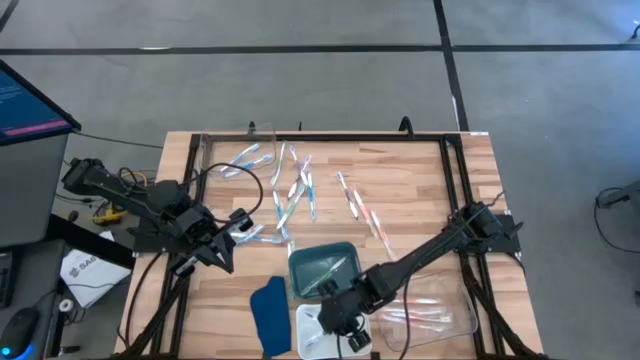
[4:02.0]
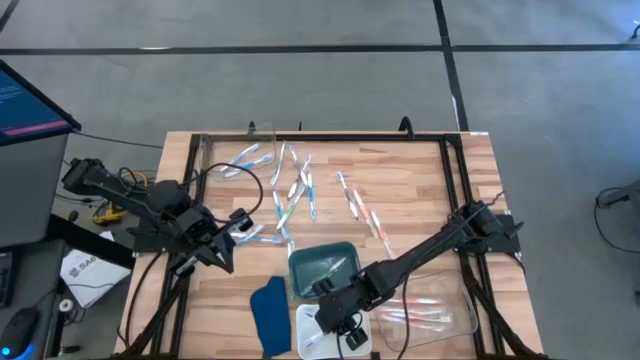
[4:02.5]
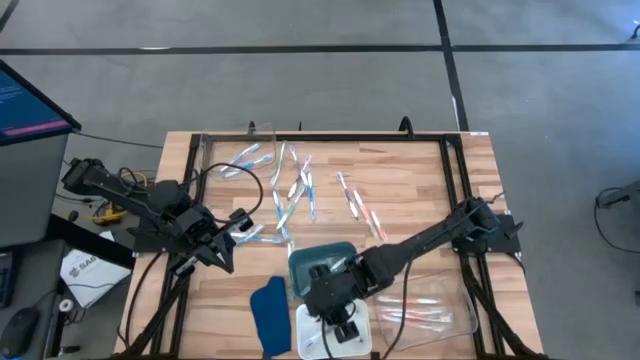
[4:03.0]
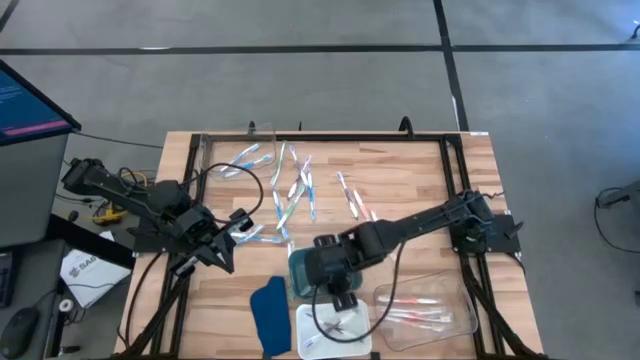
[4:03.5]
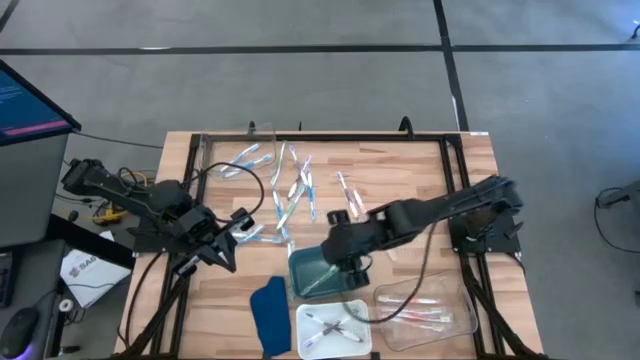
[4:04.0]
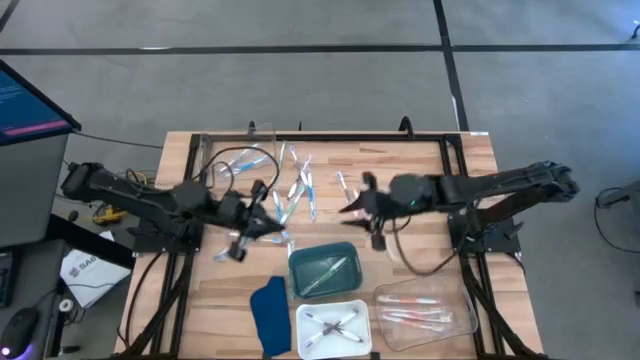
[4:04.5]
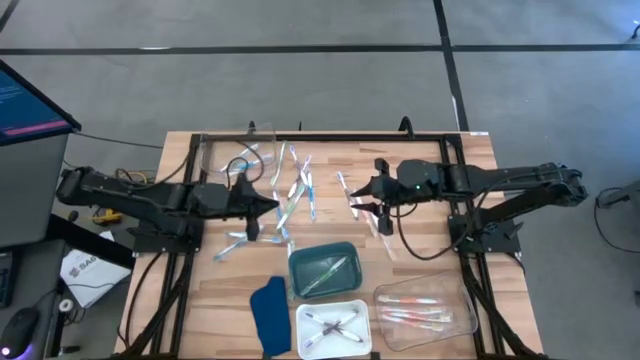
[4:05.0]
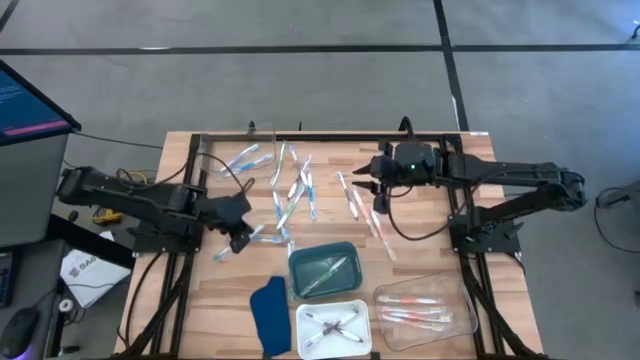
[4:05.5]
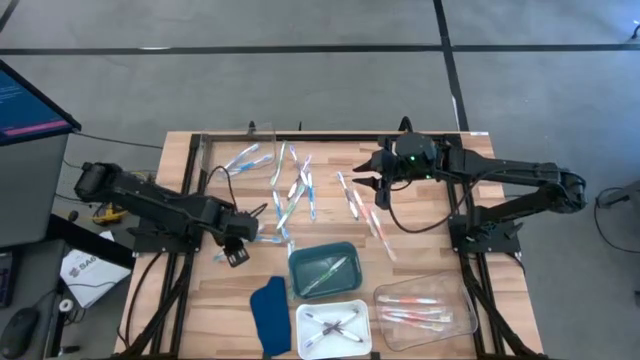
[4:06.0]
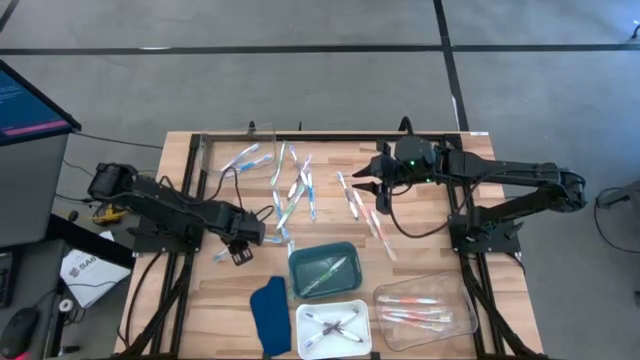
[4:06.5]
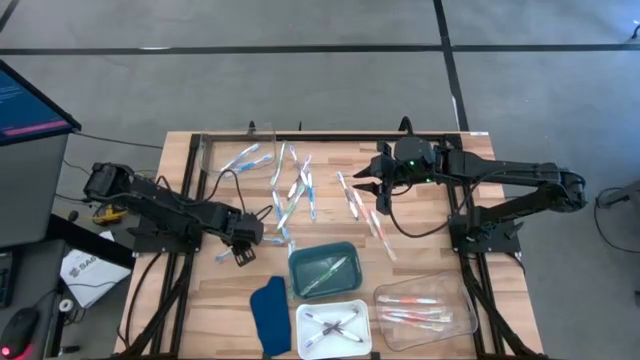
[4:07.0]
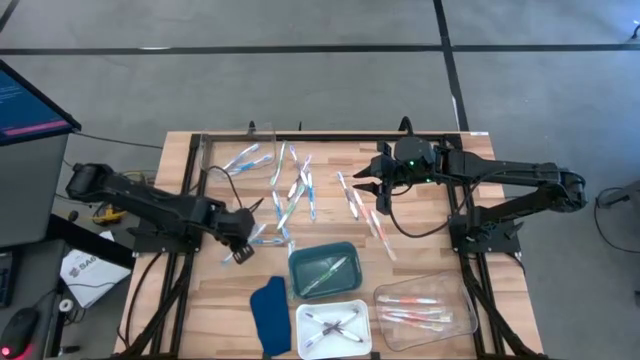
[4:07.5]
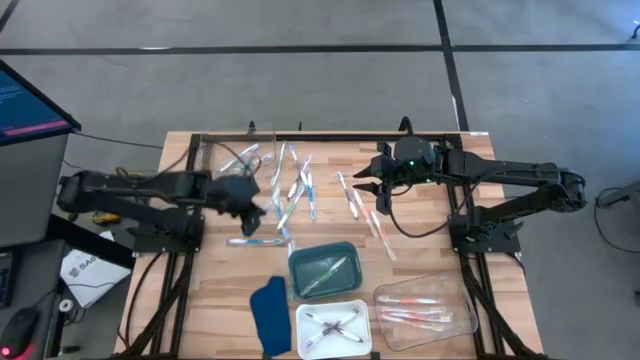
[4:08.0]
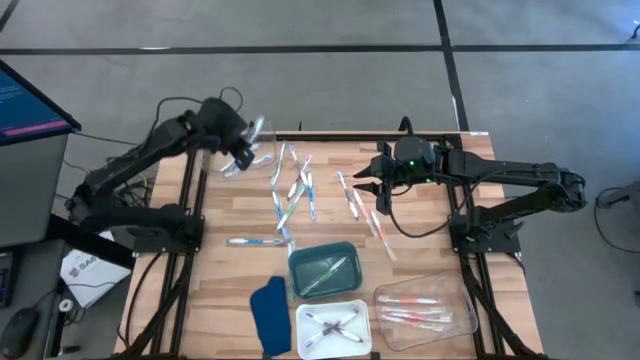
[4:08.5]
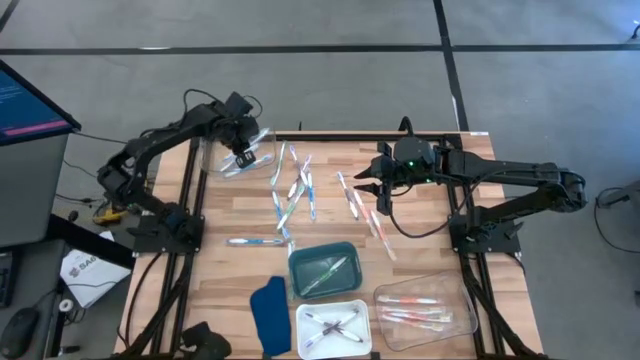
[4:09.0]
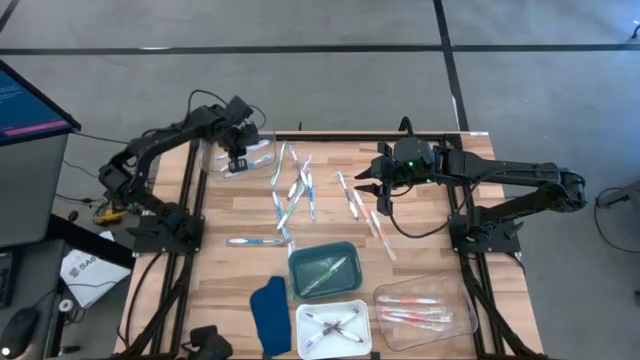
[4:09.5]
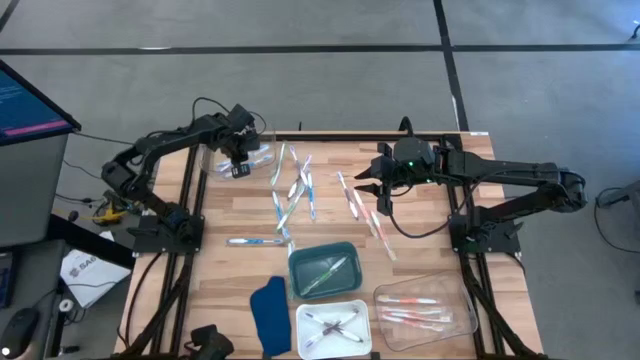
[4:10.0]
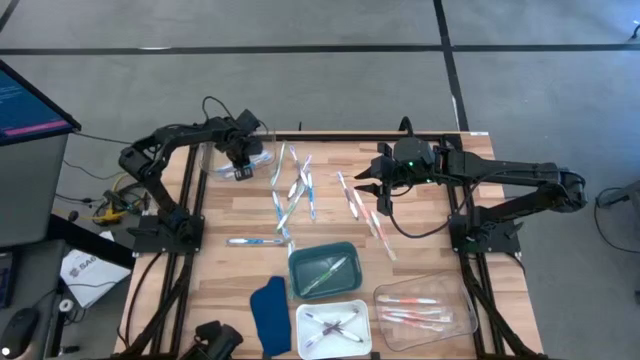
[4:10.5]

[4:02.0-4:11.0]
Task: Pick & Place Toothbrushes
Put the blue toothbrush into the top transparent bin

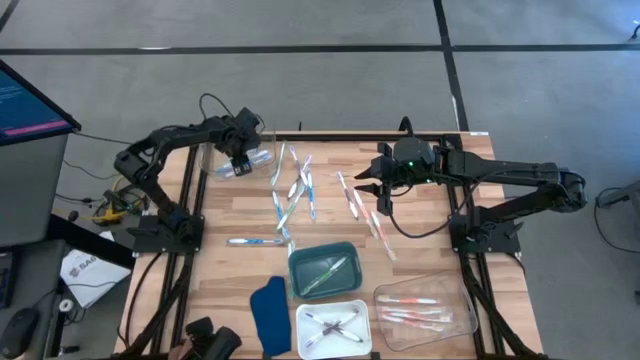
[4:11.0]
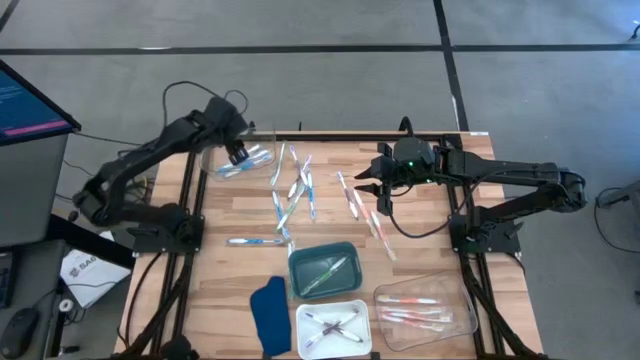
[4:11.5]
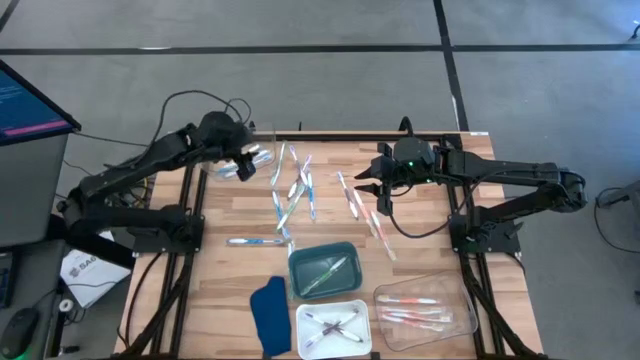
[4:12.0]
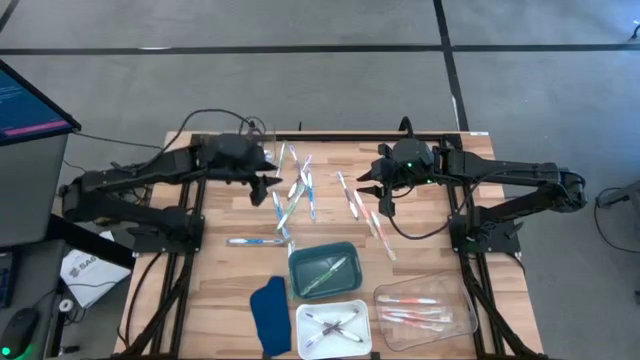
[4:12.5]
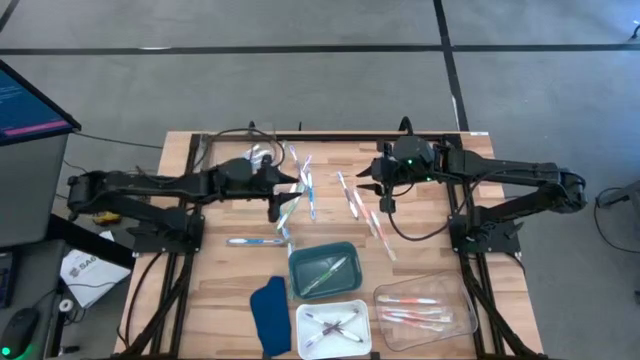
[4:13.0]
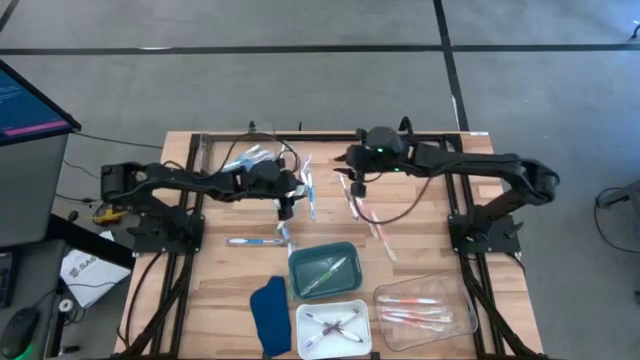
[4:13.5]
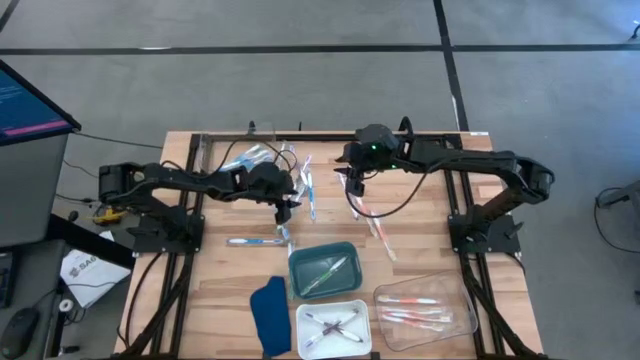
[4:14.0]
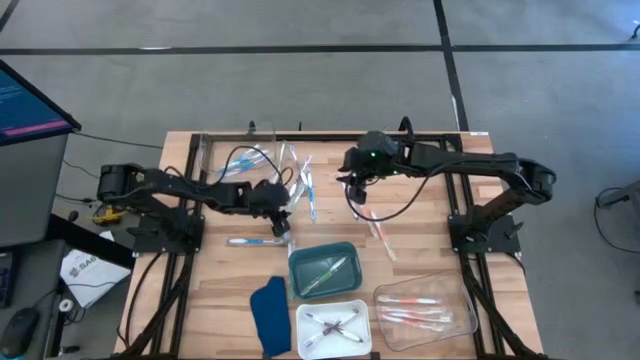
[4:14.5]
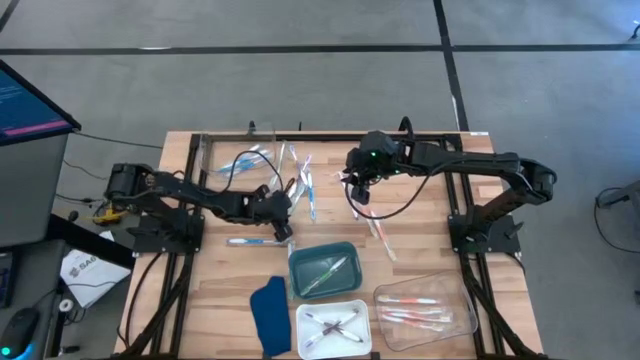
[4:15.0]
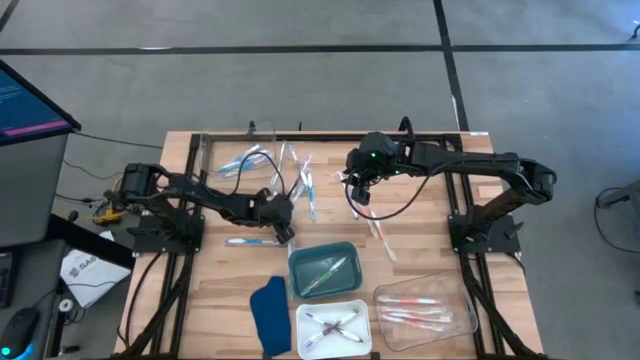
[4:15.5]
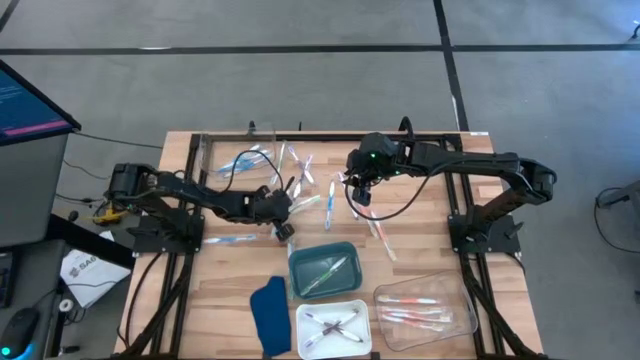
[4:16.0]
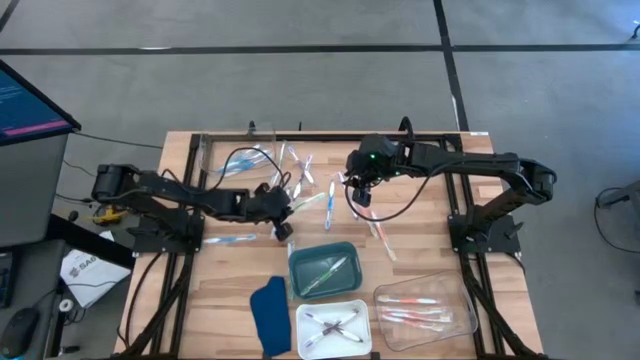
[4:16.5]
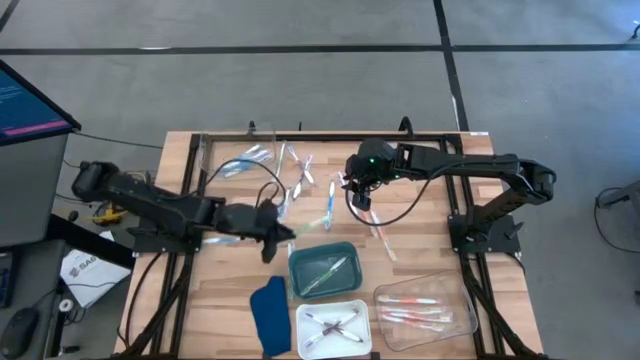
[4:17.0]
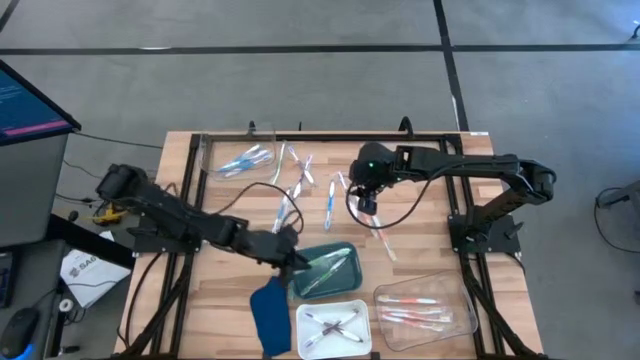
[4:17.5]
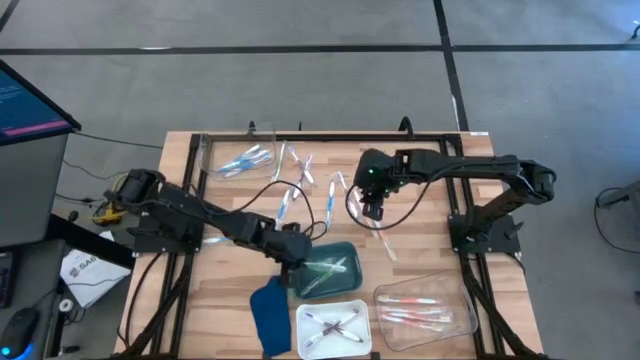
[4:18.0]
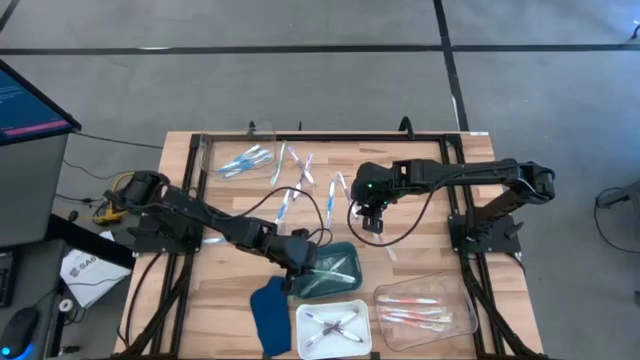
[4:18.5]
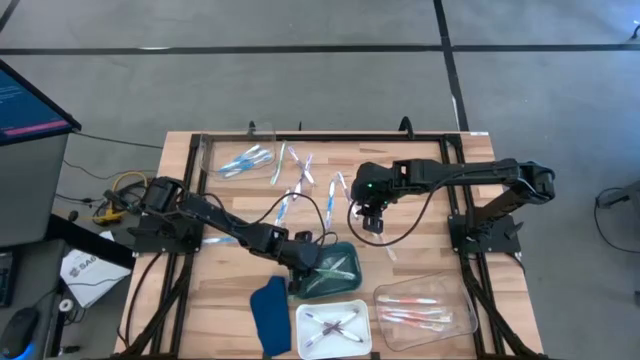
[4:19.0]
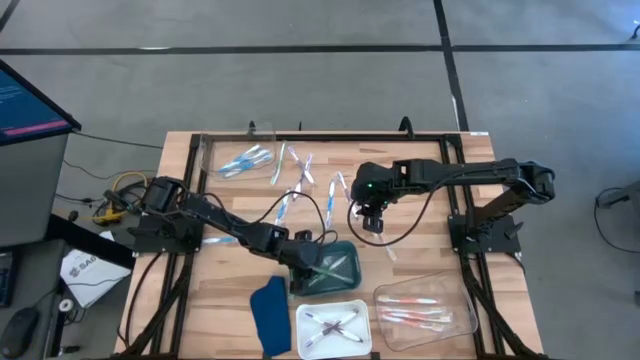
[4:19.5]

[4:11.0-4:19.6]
Put the green toothbrush into the green bin

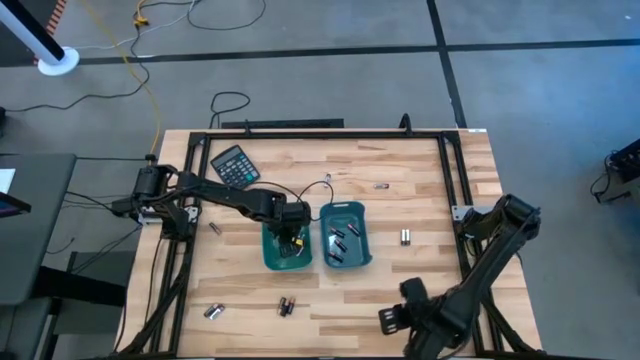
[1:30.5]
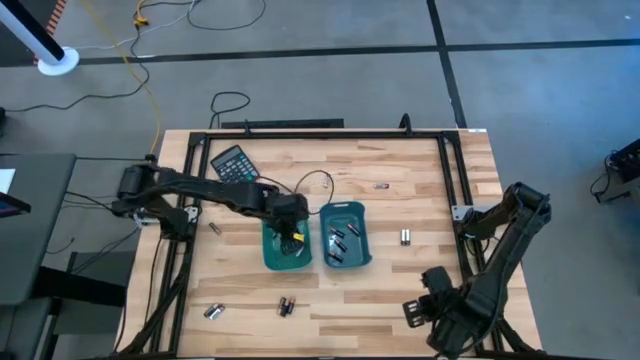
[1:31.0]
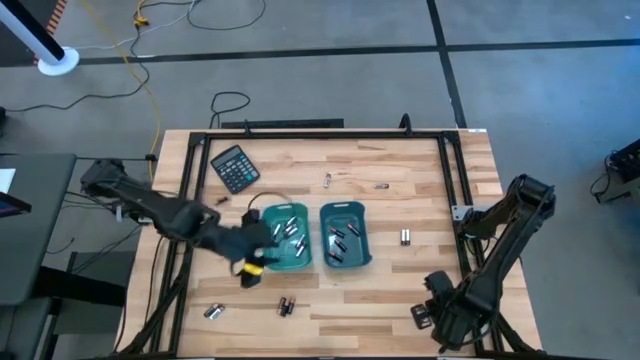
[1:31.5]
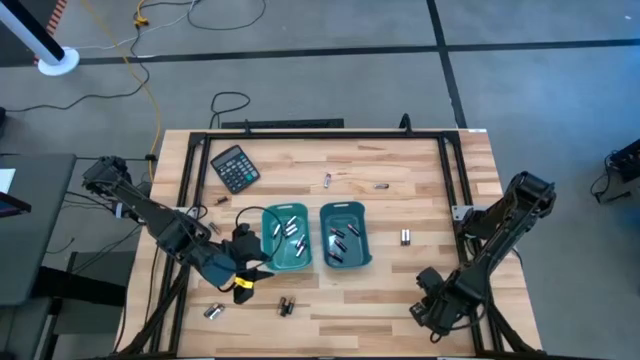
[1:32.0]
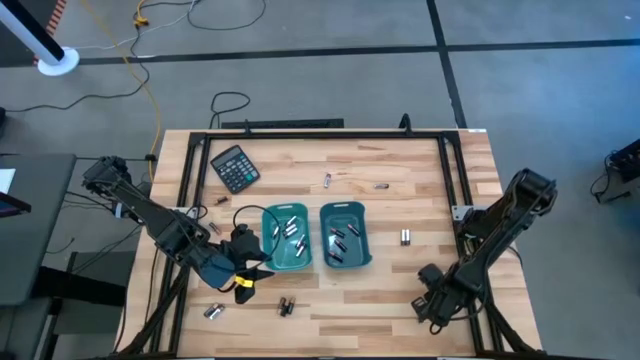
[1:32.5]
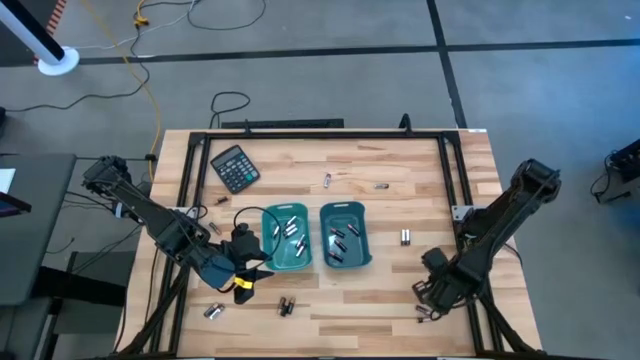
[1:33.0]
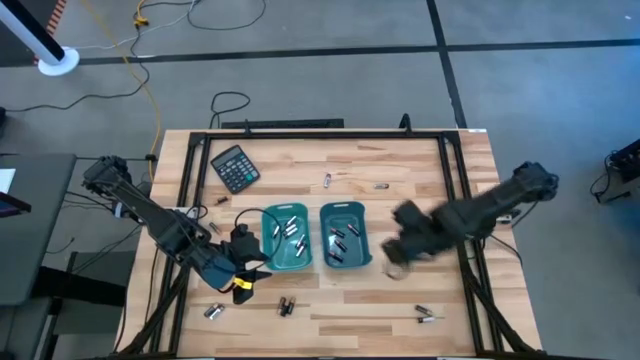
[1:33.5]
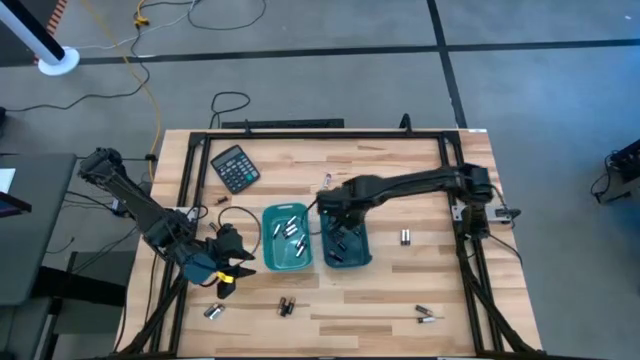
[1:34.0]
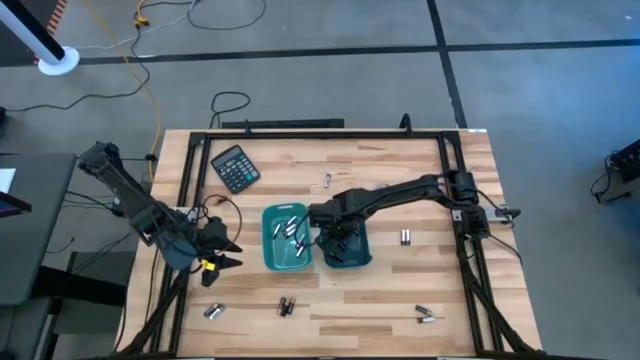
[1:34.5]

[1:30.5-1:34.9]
Task: Sort batteries
Put the black battery into the blue bin
